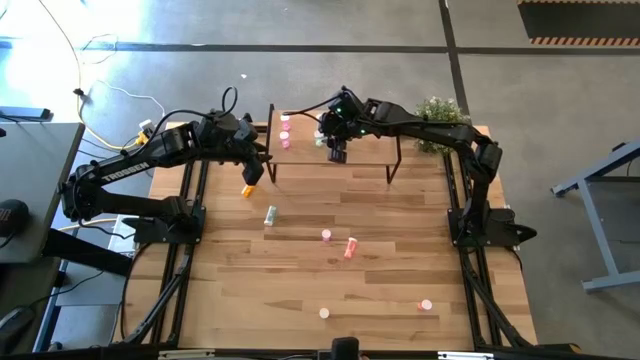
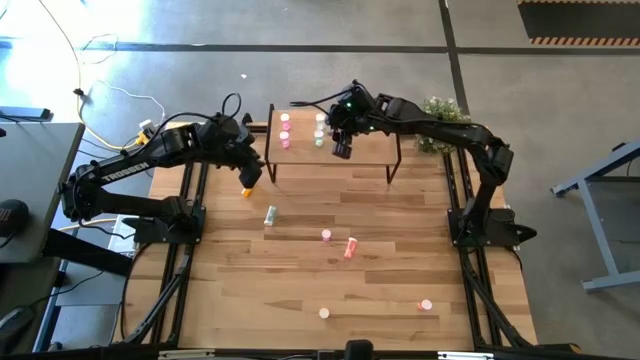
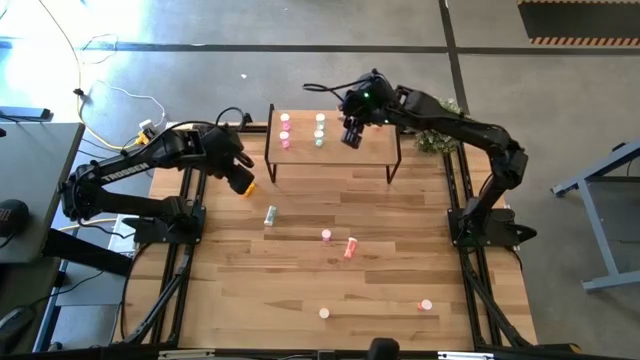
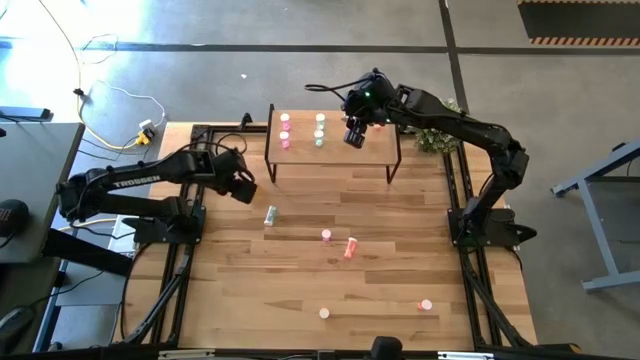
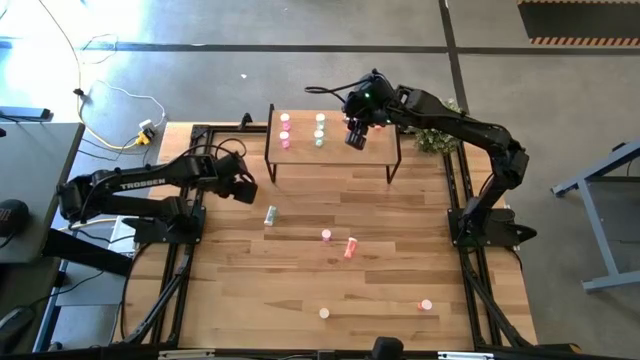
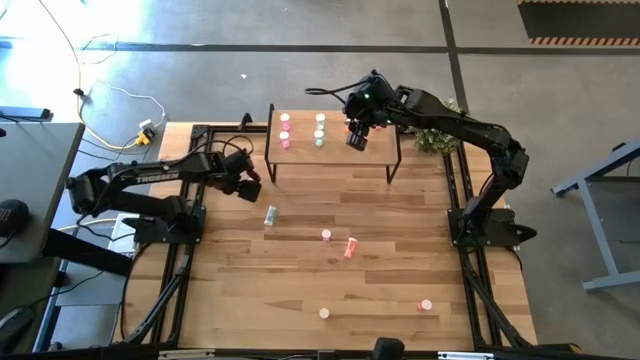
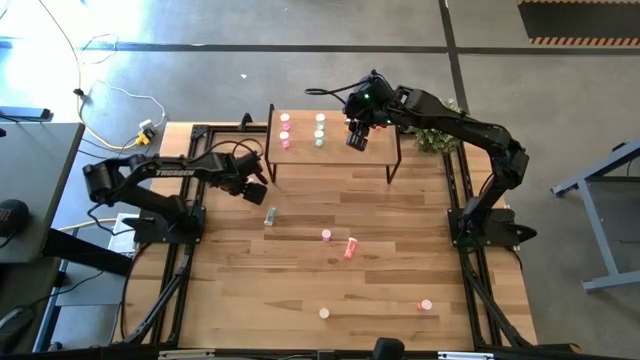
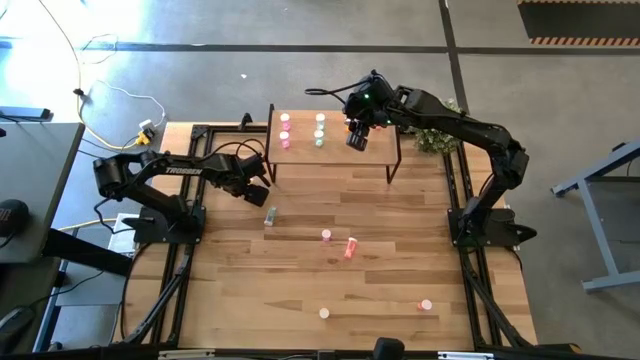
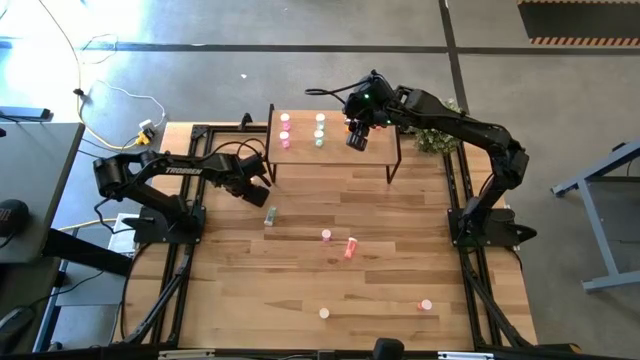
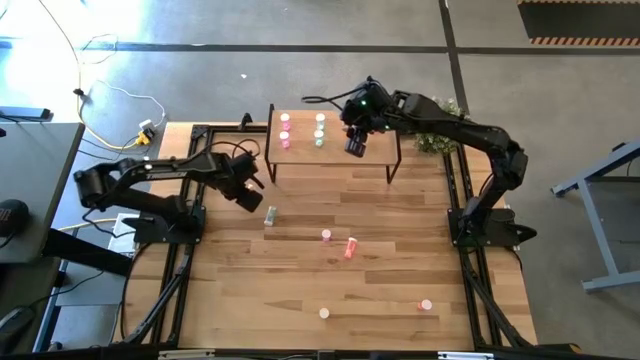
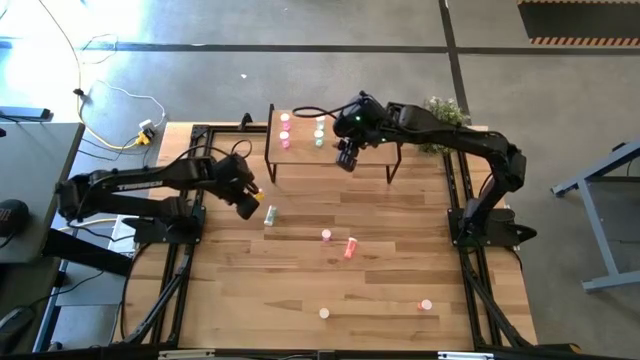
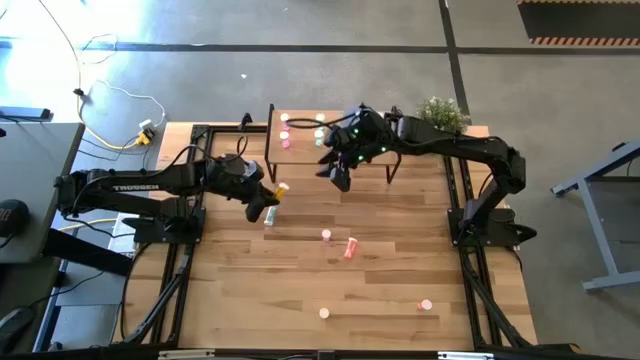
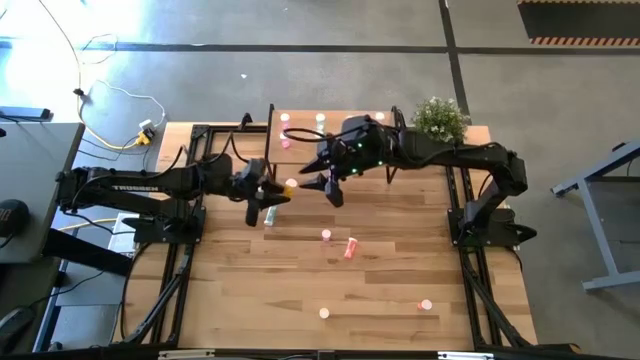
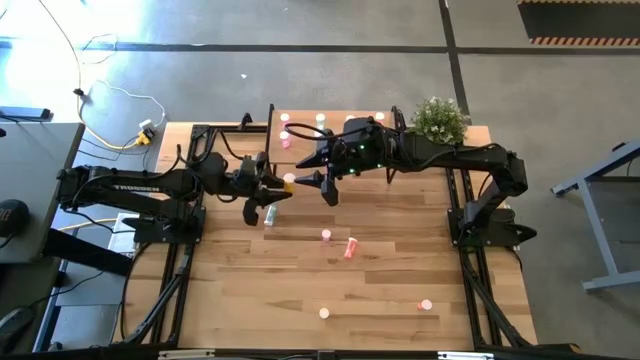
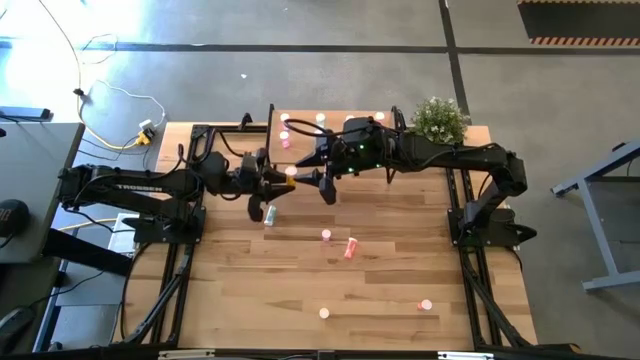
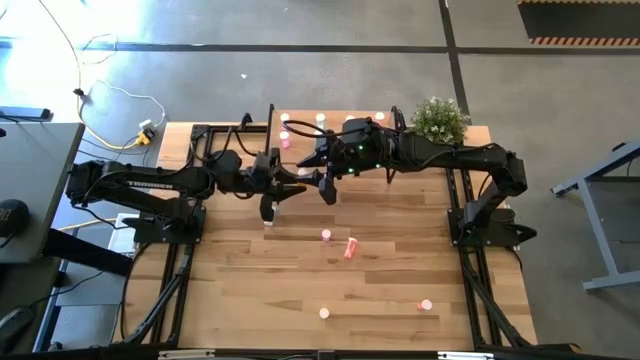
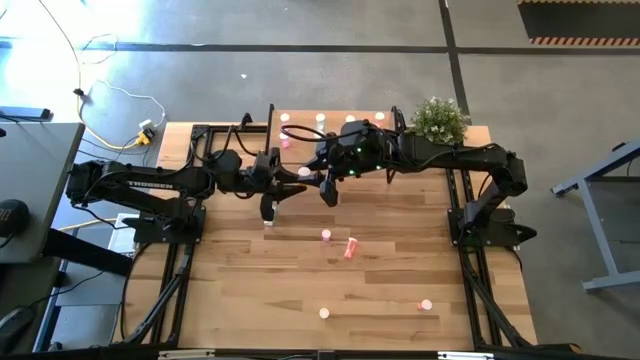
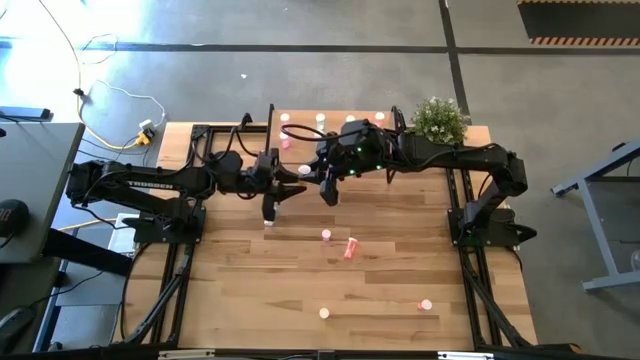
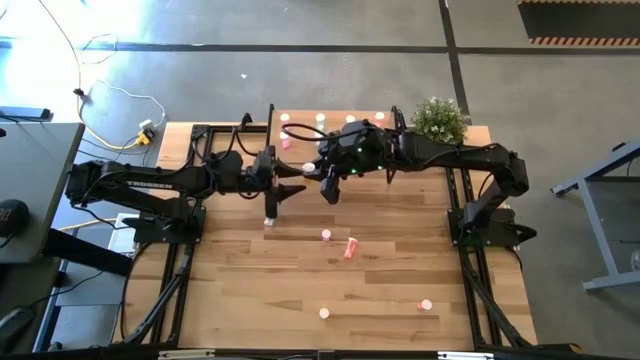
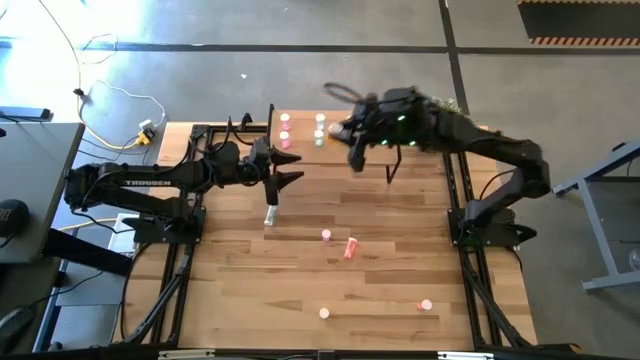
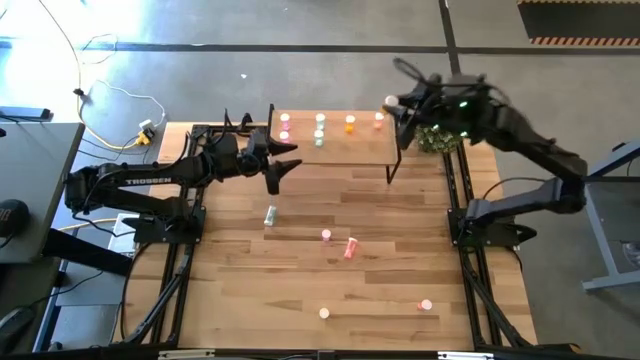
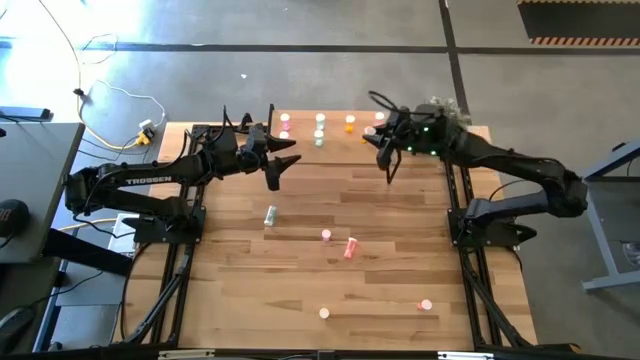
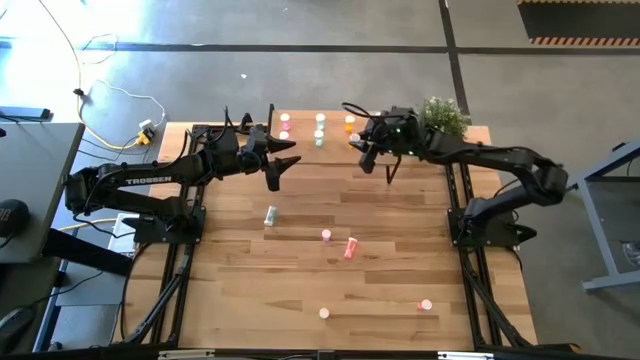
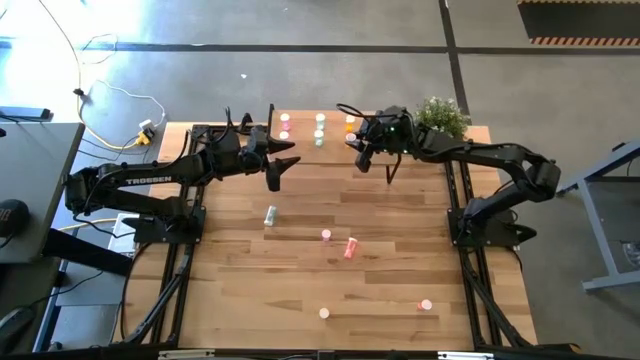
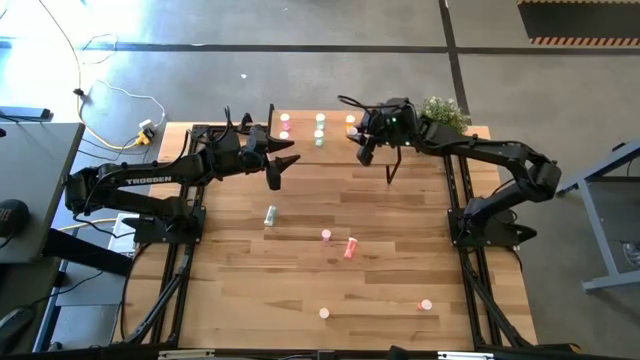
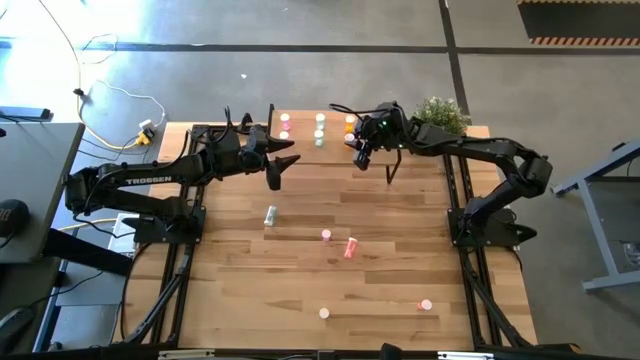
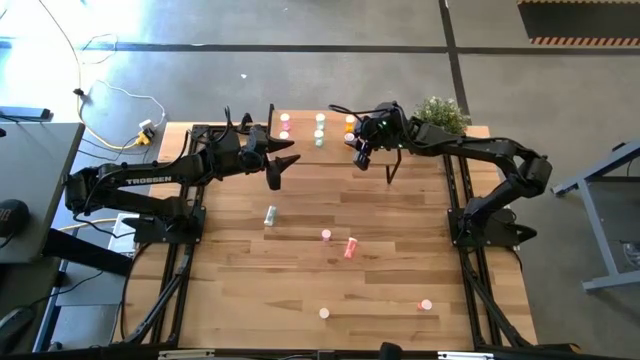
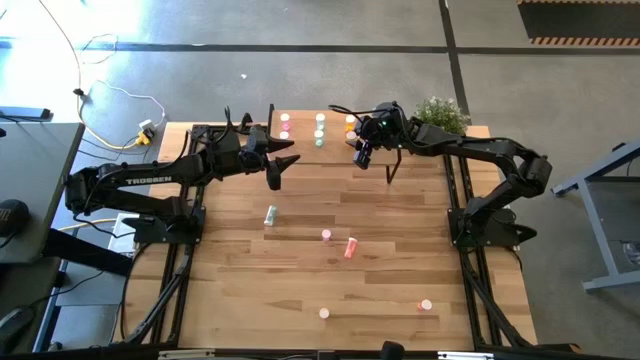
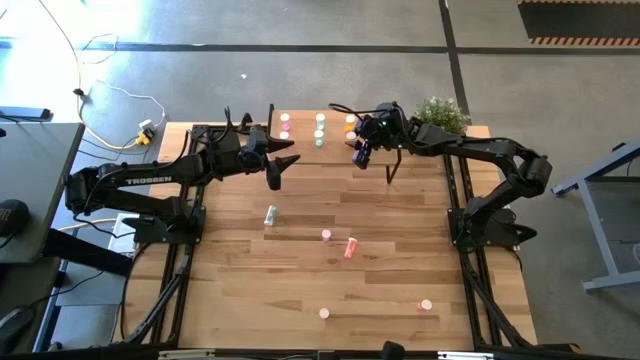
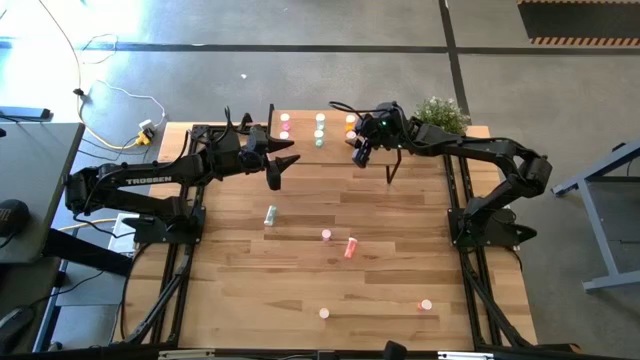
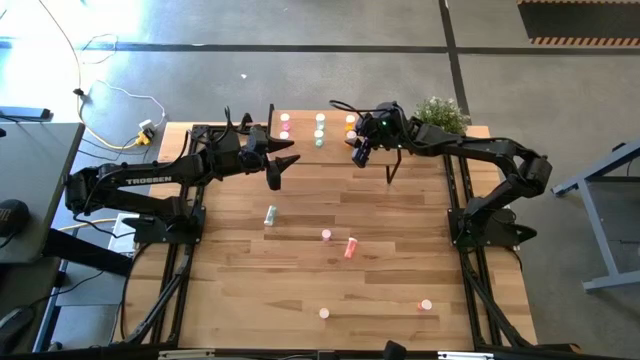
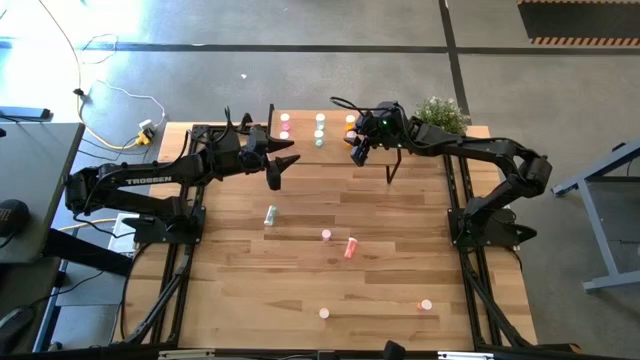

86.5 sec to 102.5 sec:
Task: Pick and place medicine bottles onto shelf by color
Put the left yellow pill bottle on the shelf aligned with the yellow pill bottle

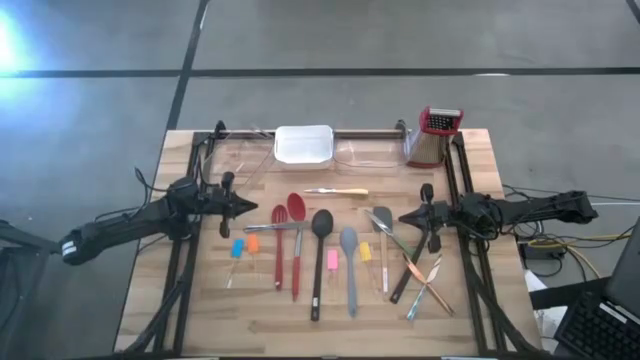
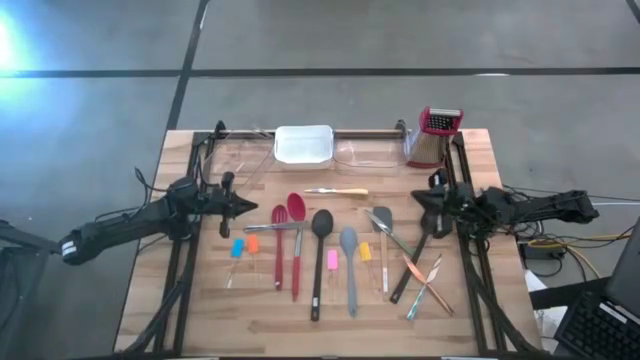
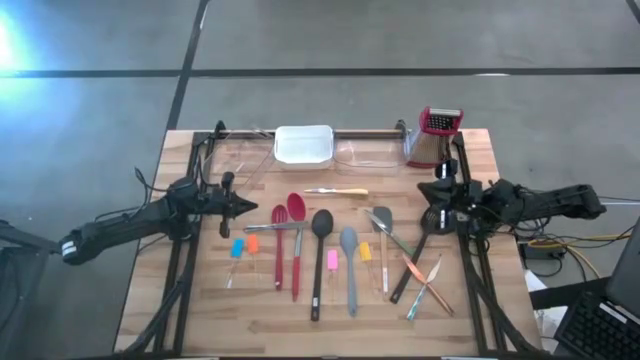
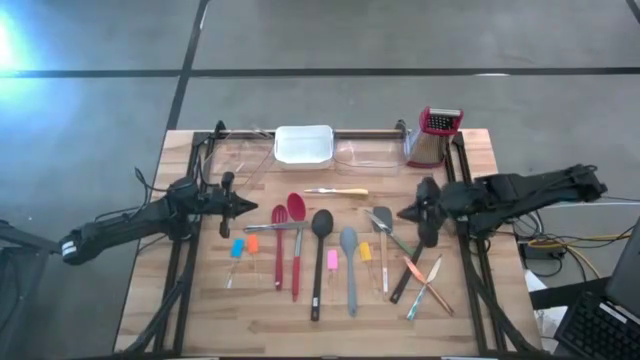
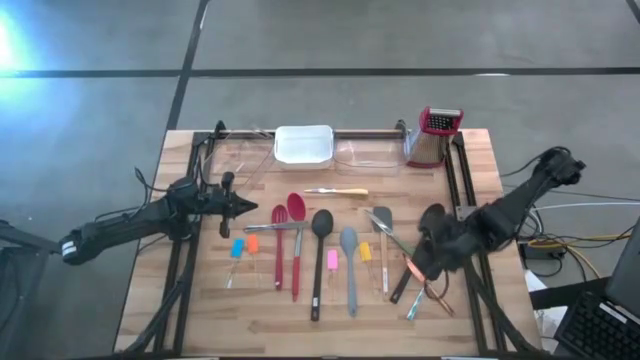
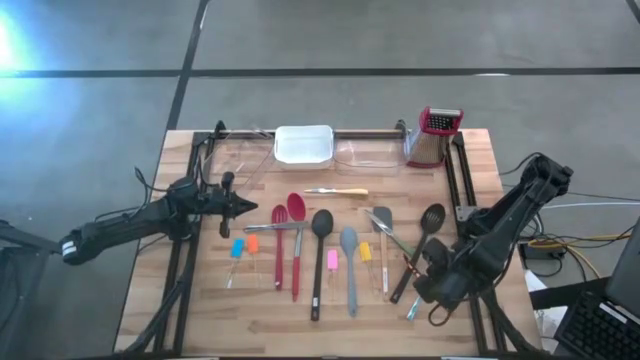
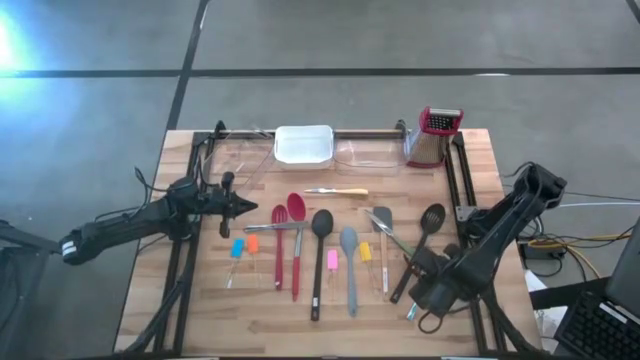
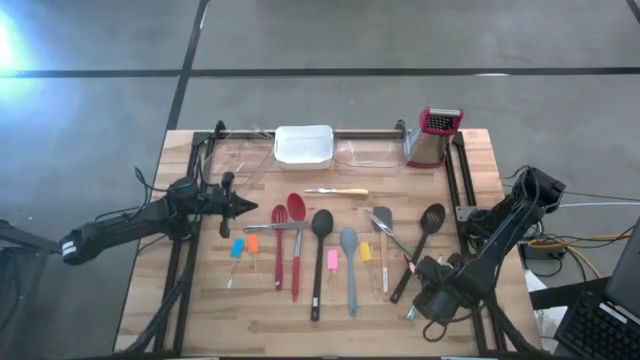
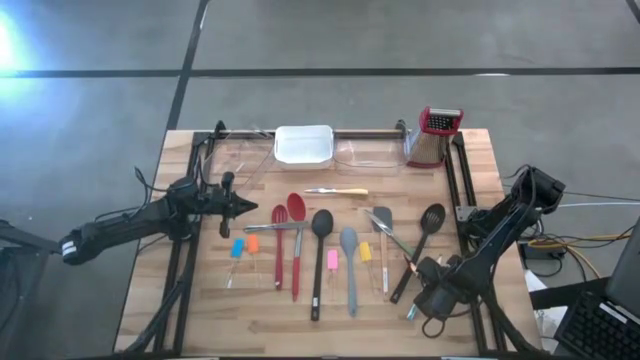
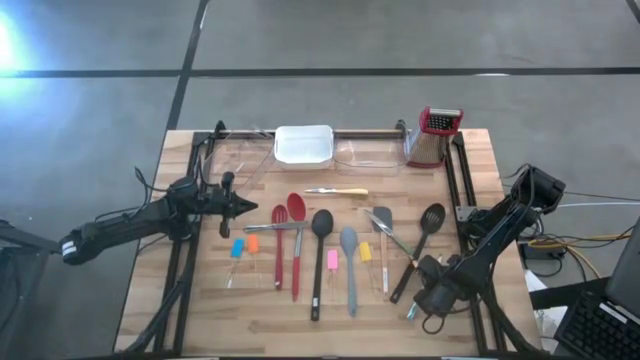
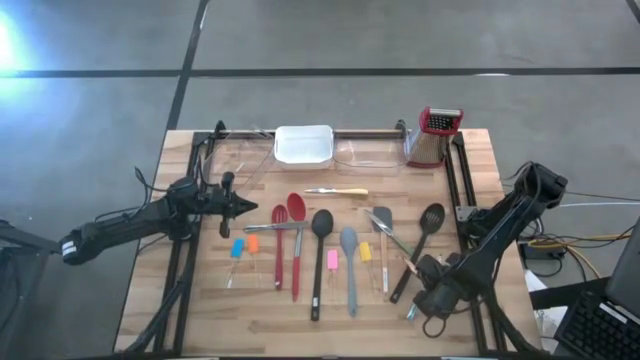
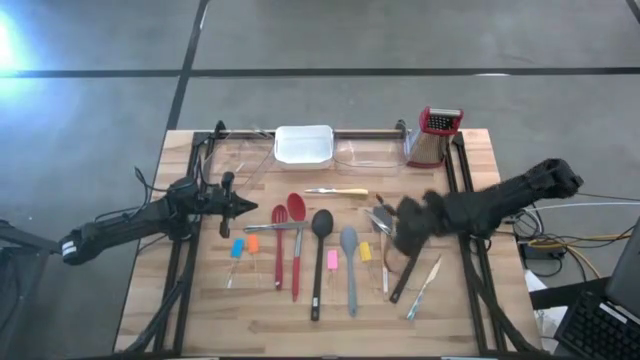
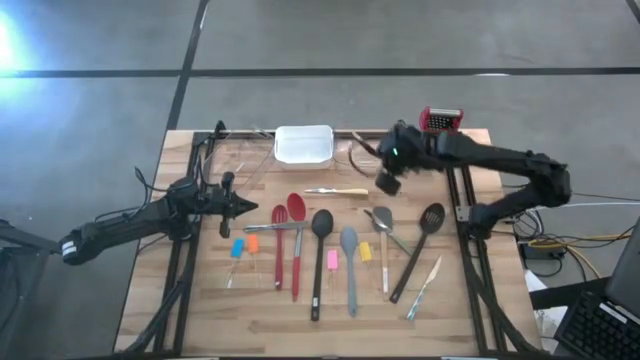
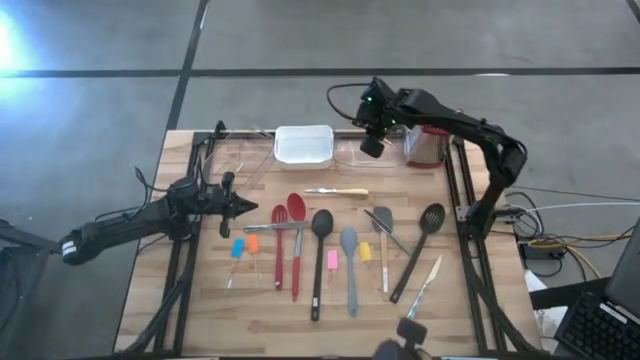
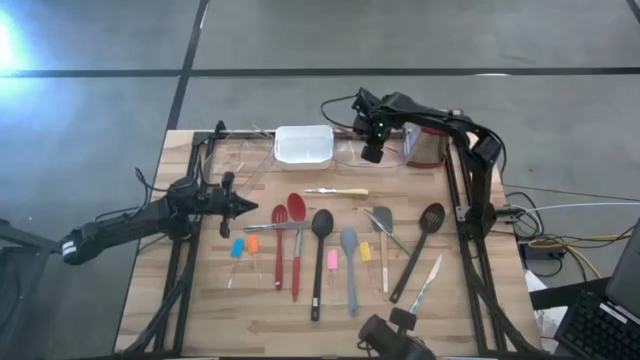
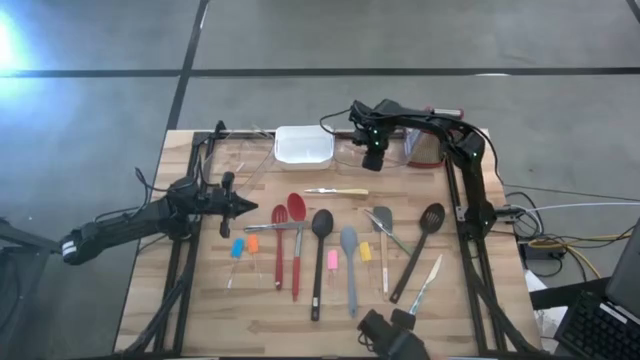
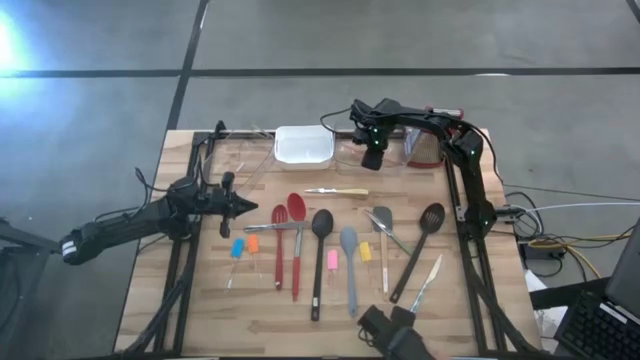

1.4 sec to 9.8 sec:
Task: Pick & Place Kitchen Items
Put the gold table knife into the right transparent bin
